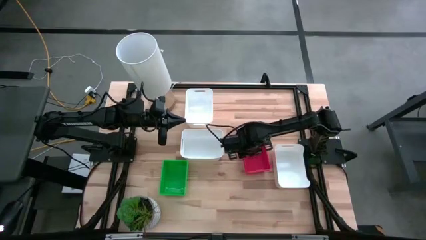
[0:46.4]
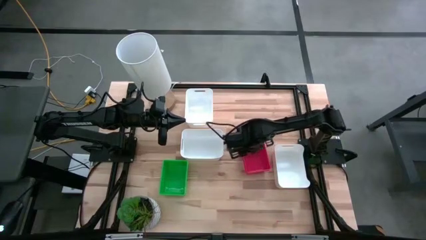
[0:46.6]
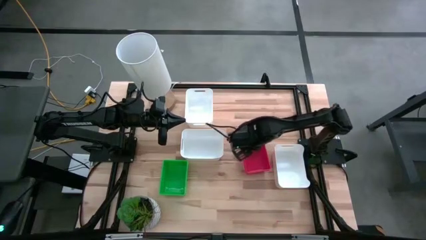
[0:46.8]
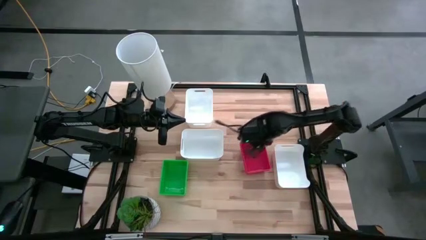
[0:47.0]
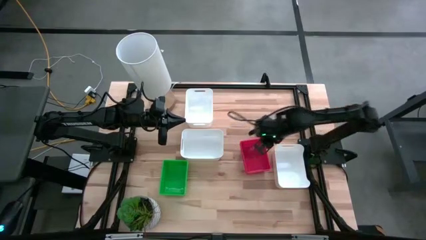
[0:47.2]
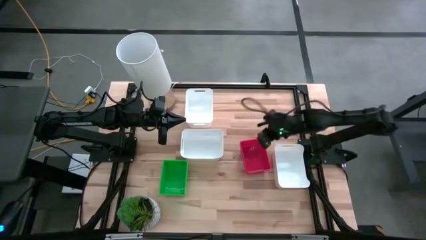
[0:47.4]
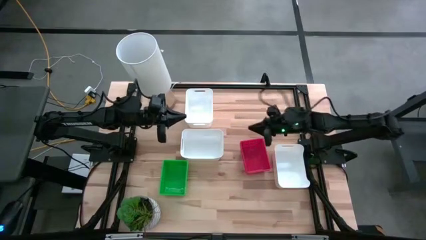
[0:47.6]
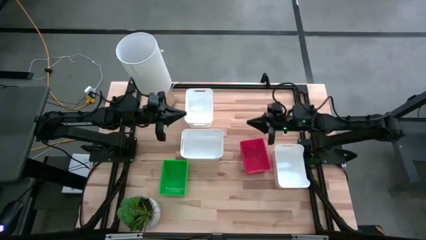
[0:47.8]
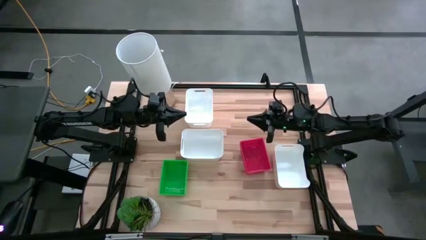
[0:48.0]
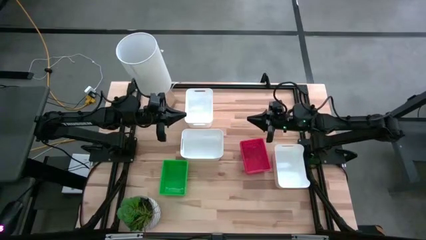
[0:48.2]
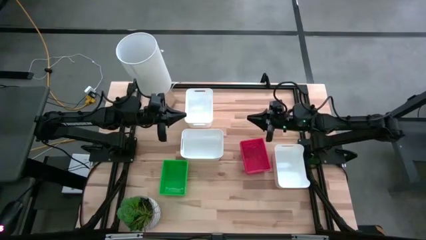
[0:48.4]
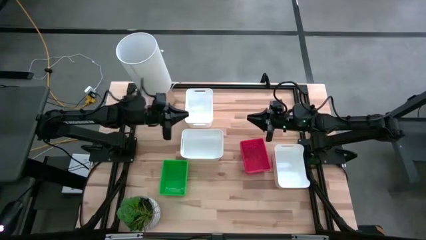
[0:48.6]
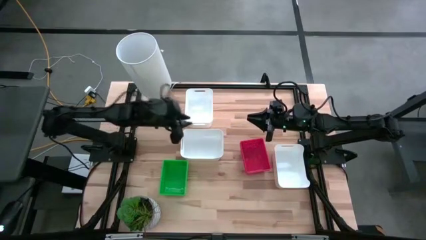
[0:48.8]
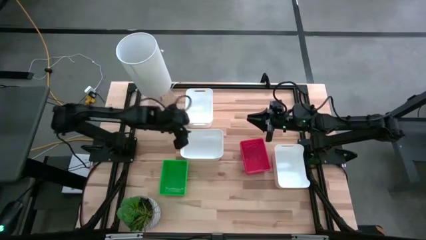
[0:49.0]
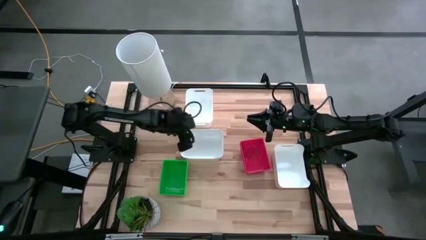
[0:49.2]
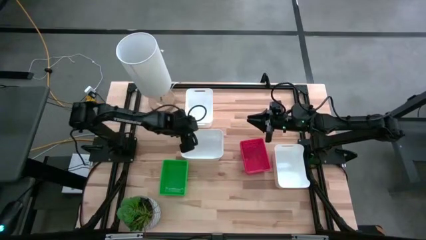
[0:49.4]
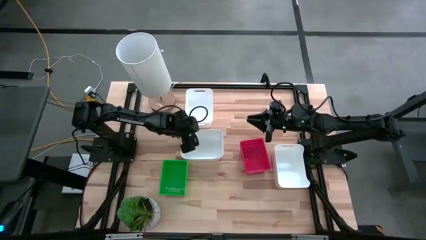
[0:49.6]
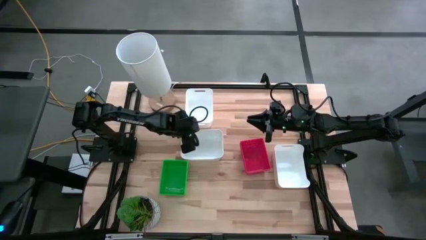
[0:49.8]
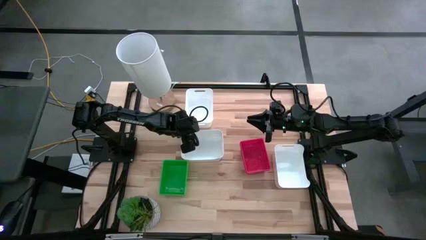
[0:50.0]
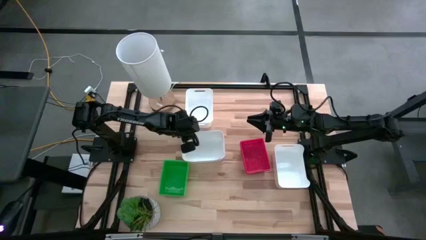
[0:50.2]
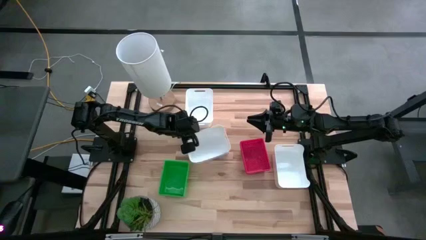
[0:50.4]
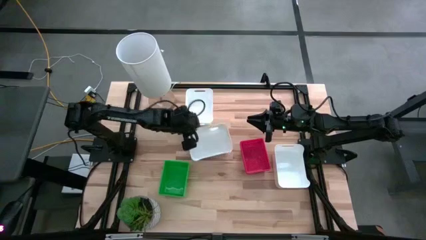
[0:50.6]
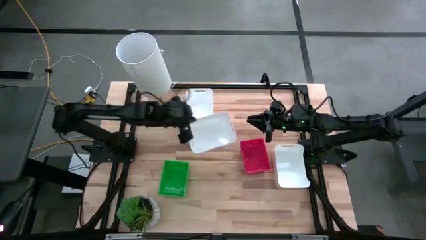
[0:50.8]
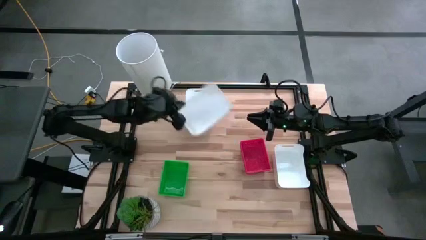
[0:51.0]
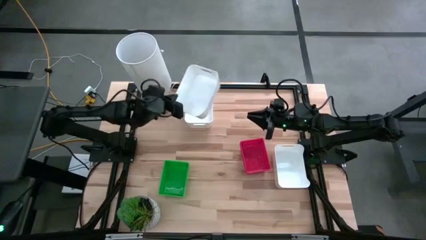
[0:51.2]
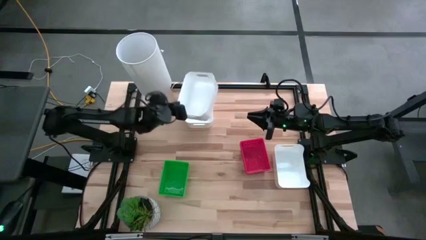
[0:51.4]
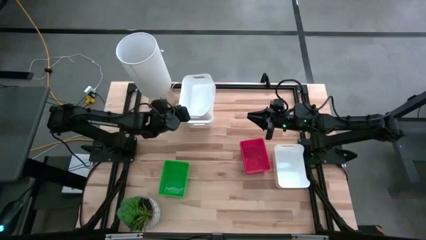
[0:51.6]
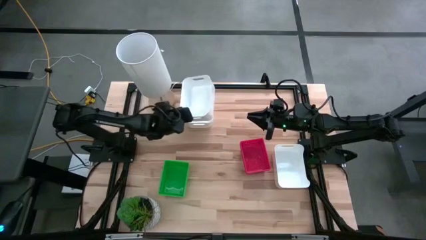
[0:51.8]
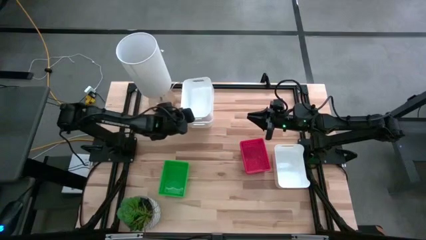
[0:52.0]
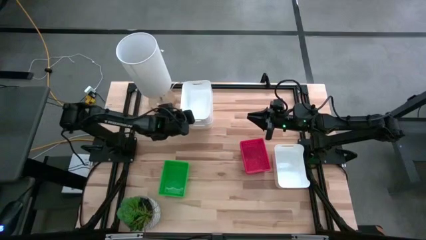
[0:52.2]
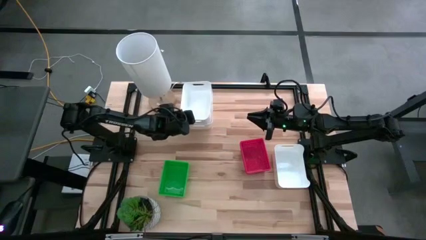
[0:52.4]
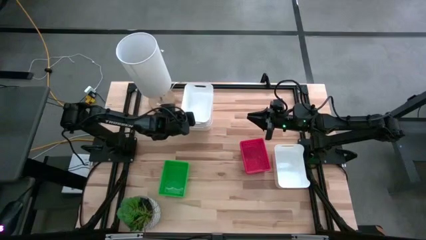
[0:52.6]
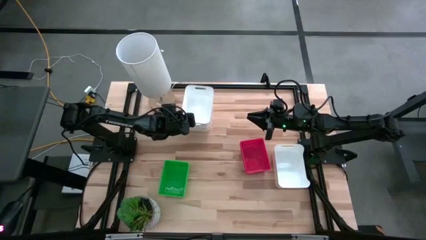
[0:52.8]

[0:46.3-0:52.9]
Stack the bottom left white bin on the top white bin
